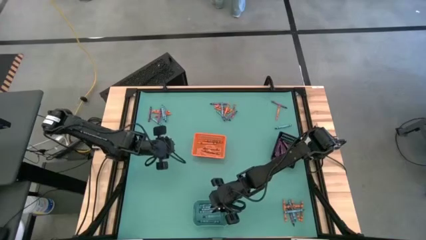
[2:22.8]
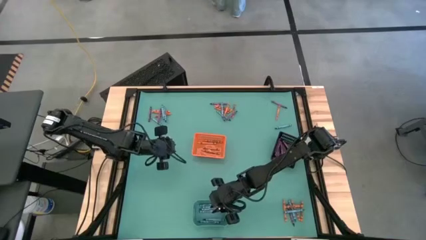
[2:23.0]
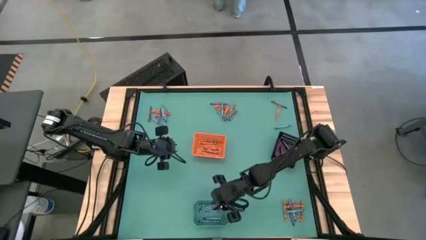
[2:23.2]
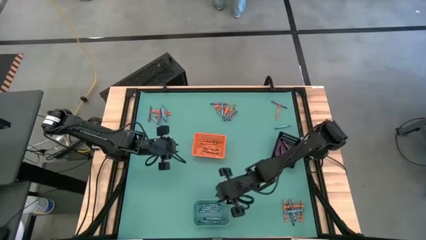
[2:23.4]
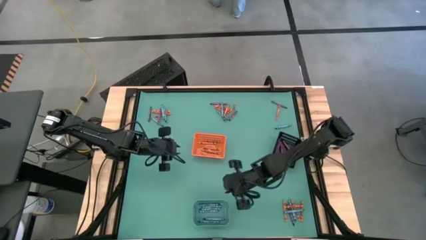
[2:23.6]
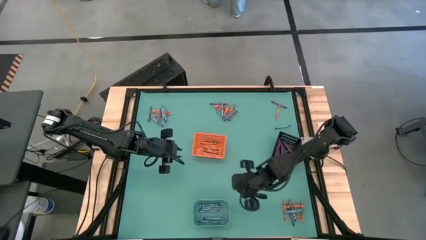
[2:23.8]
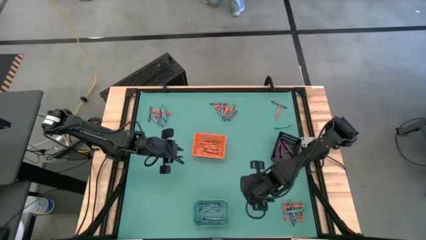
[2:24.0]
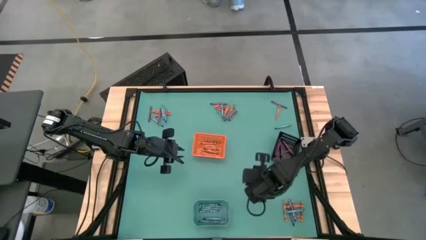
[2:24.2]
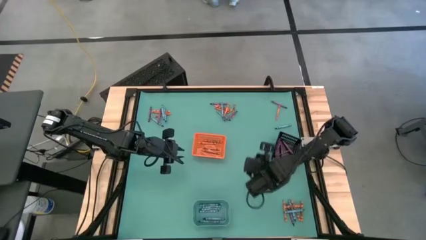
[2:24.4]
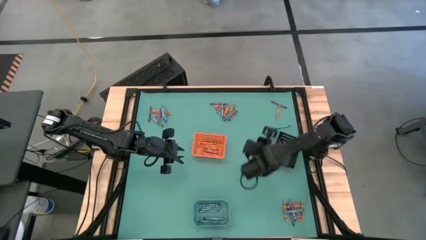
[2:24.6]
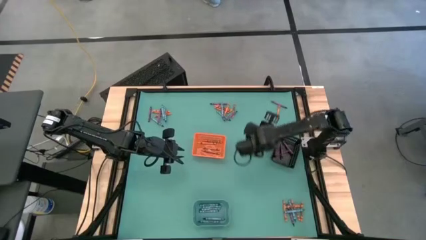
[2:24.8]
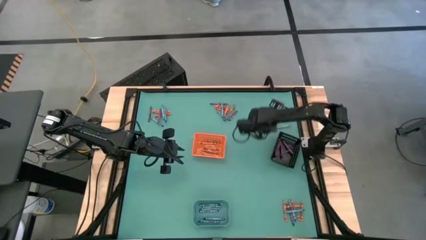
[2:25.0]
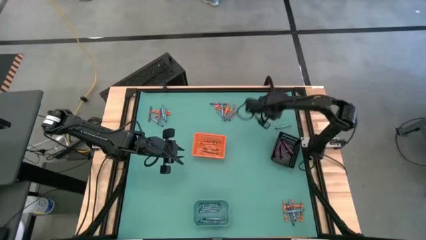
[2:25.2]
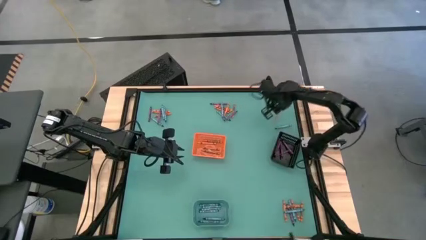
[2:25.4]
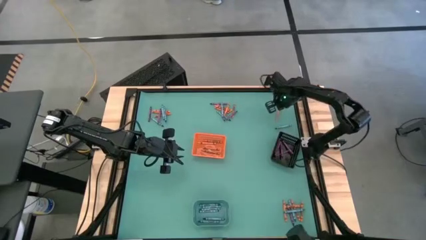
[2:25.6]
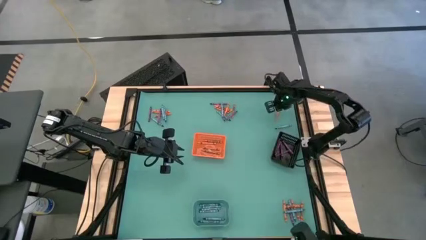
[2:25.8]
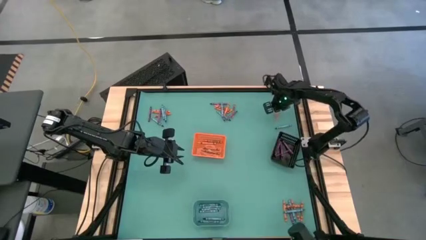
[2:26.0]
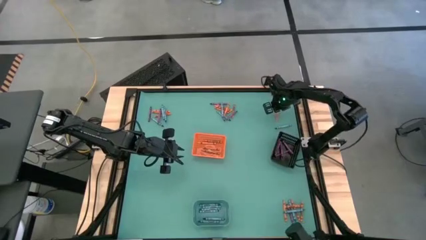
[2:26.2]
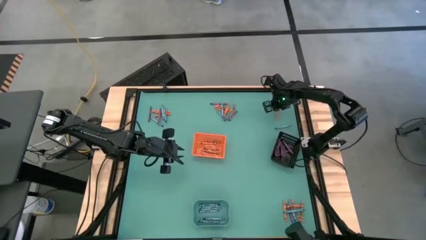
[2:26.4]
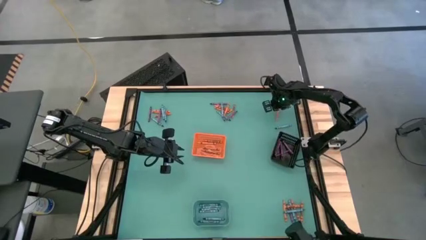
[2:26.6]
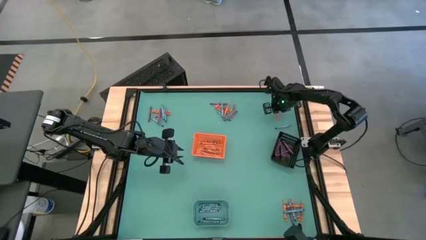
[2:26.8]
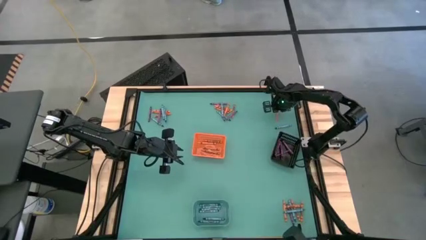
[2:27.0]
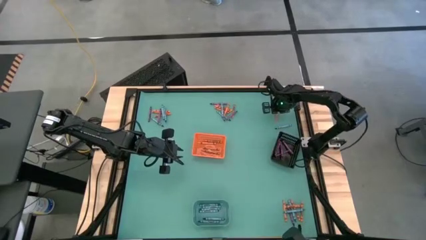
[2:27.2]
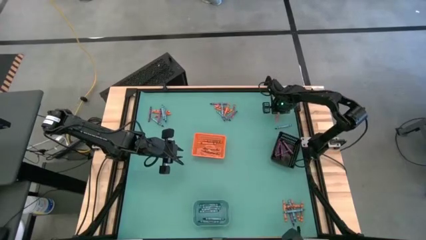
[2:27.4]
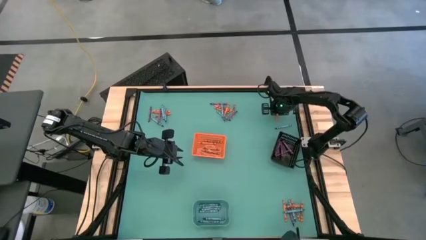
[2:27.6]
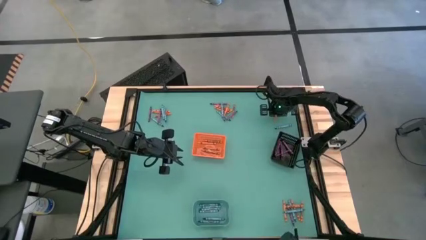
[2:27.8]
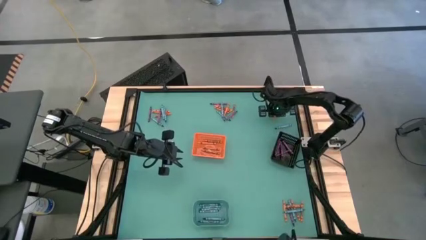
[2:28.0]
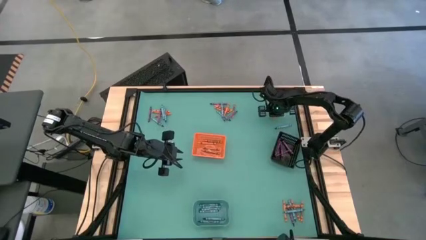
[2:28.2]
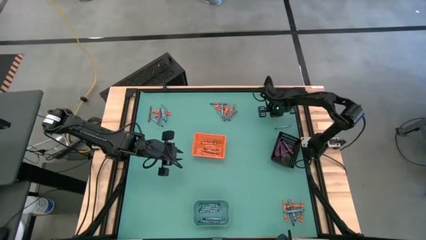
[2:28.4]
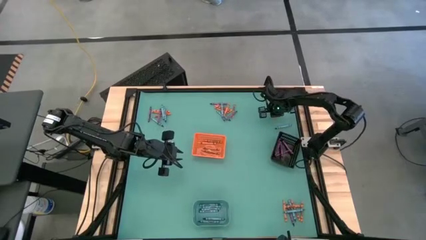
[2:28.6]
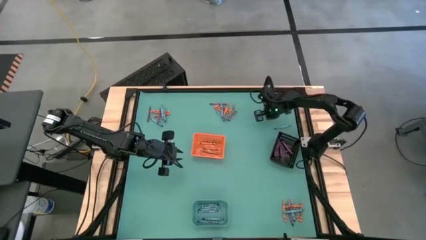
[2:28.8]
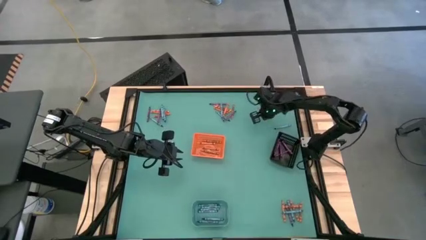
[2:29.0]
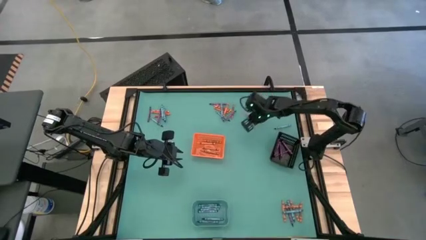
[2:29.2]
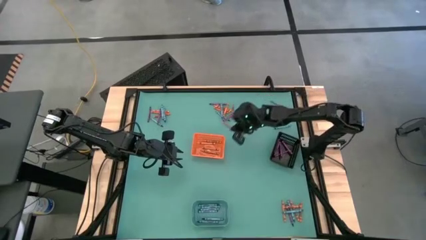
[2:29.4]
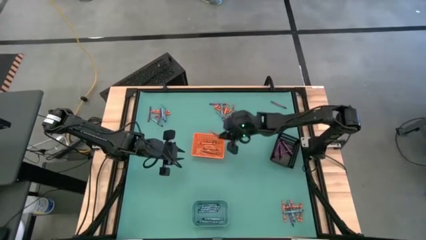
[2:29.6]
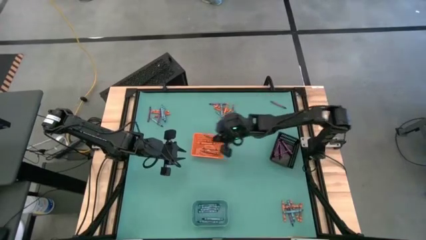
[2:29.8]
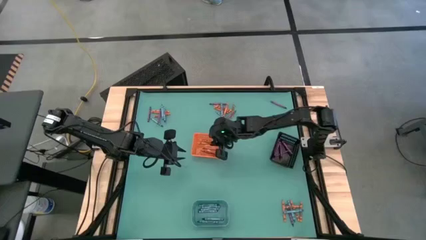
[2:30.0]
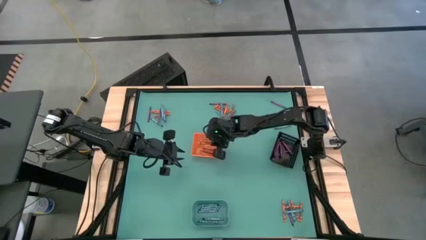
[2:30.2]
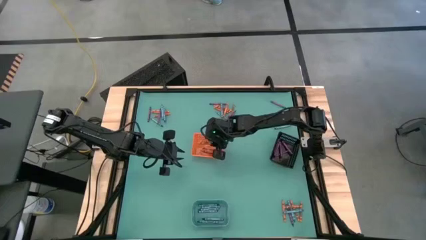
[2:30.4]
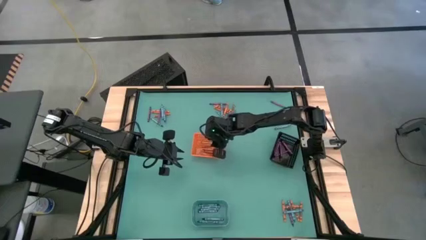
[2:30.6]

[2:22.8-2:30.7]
Task: Sort crayons
Put the orange crayon into the orange bin

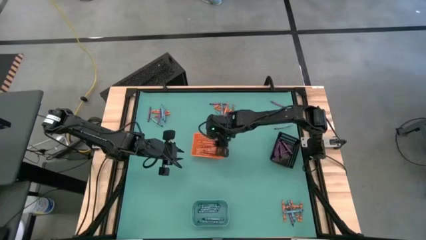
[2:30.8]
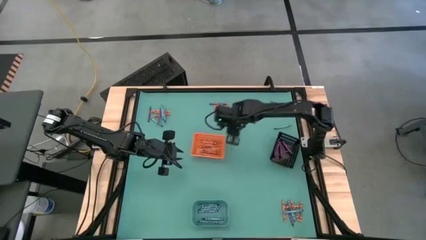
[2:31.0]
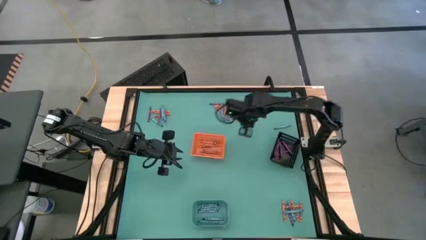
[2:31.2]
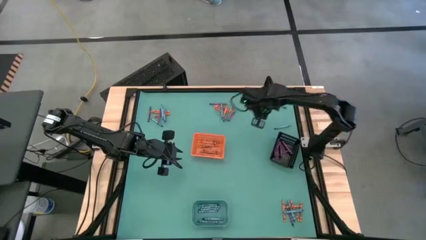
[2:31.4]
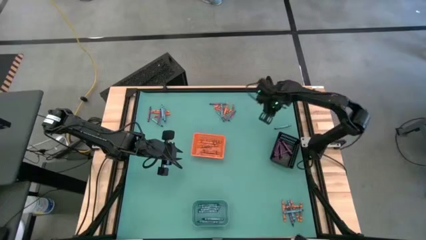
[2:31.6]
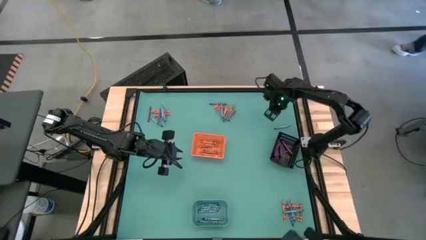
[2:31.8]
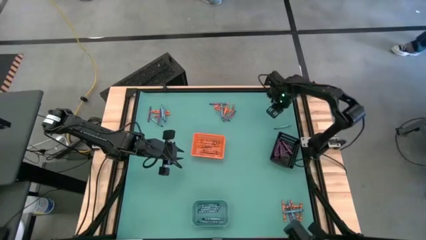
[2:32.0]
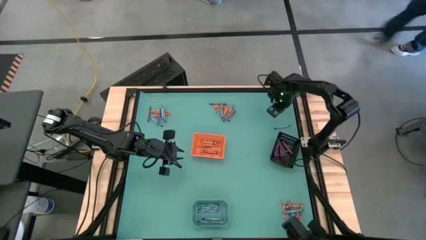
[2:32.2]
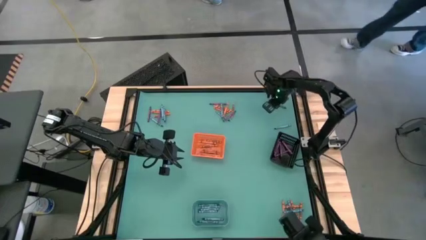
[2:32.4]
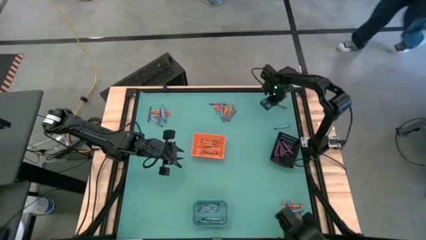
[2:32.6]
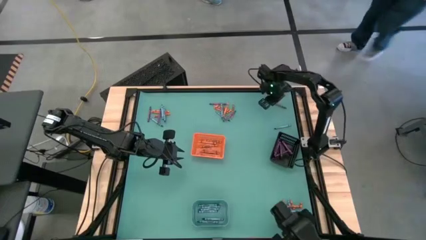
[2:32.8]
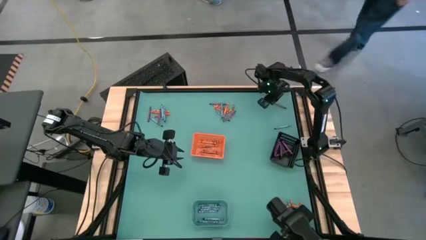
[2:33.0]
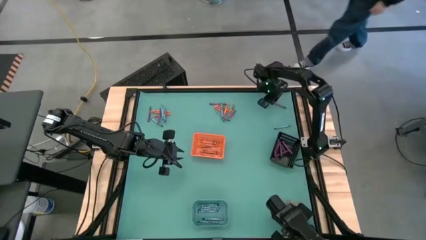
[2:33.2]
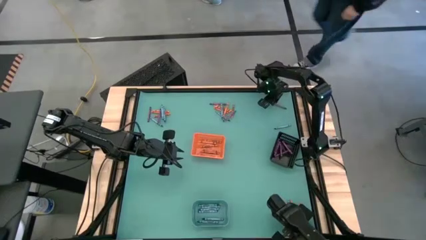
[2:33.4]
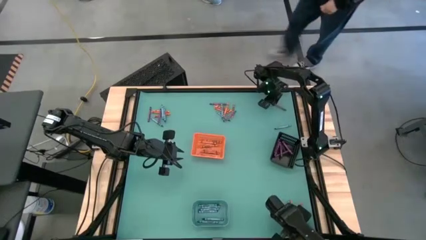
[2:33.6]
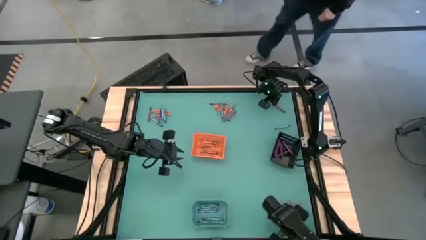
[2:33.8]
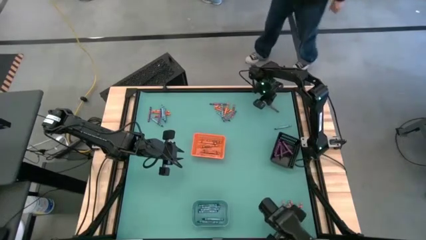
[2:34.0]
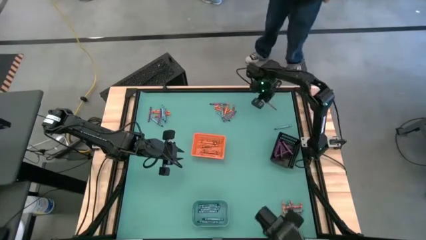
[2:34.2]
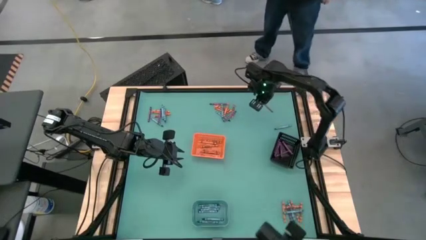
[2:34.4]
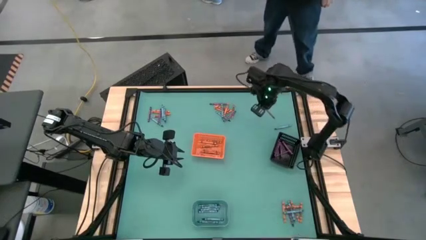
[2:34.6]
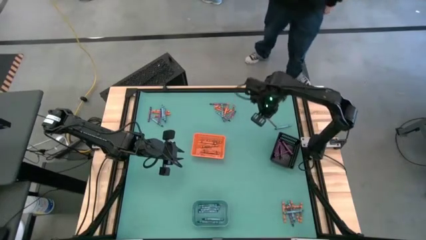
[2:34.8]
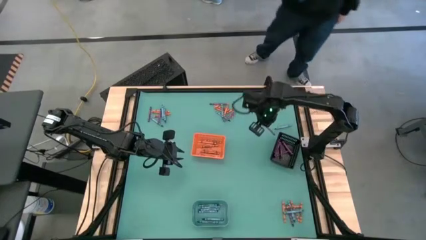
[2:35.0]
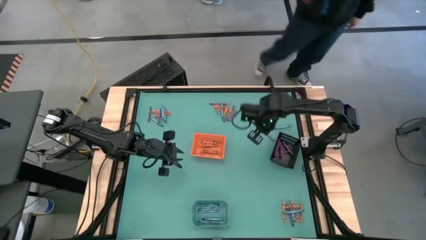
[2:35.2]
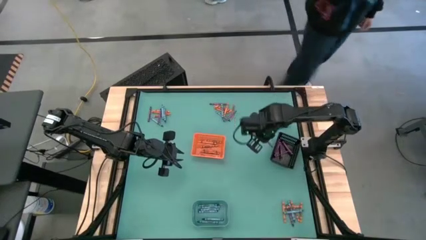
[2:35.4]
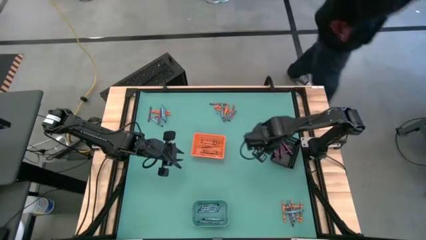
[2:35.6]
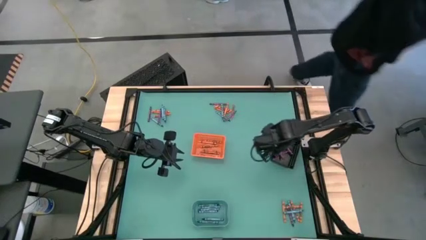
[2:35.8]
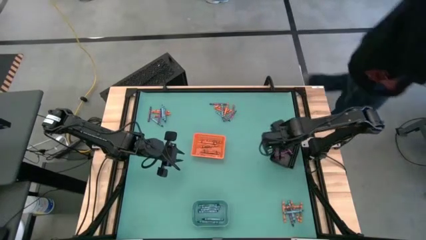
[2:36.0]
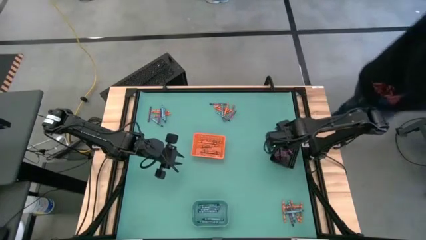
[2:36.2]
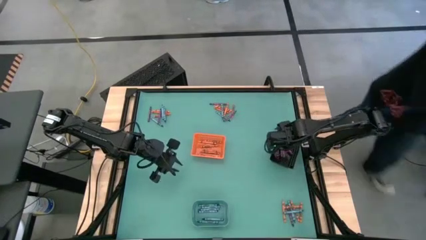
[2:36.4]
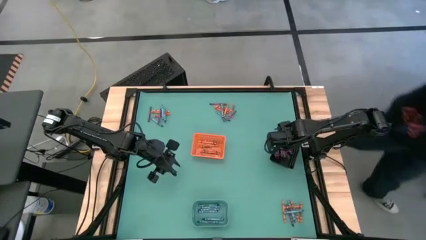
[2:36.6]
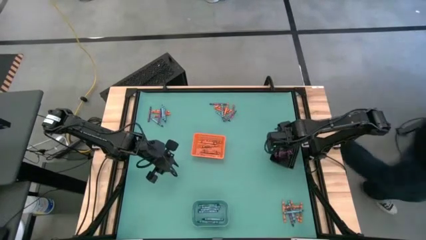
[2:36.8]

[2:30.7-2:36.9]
Put the purple crayon into the black bin
